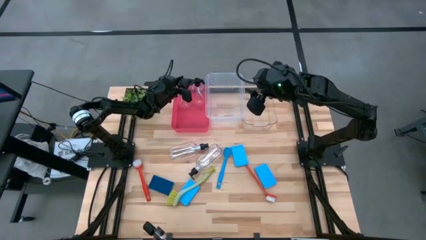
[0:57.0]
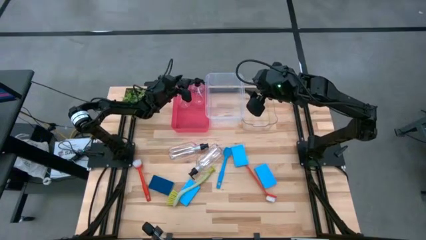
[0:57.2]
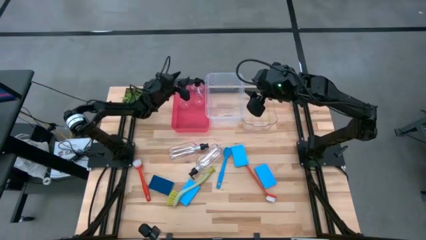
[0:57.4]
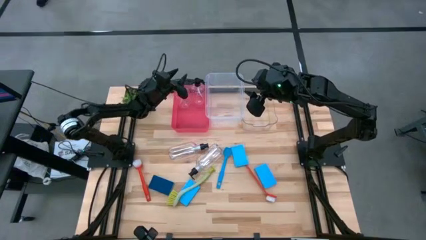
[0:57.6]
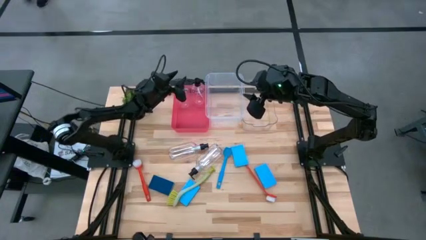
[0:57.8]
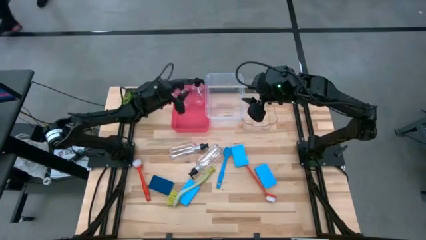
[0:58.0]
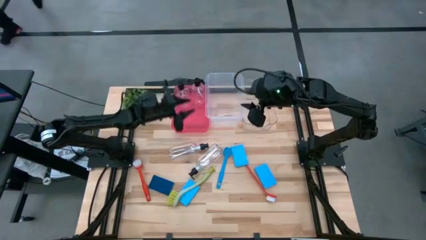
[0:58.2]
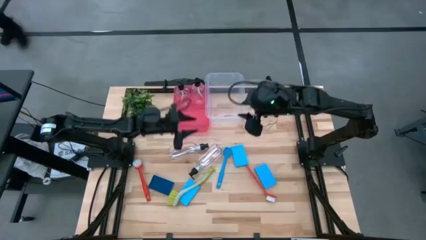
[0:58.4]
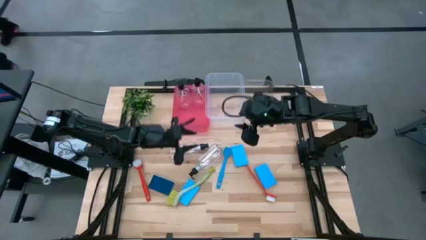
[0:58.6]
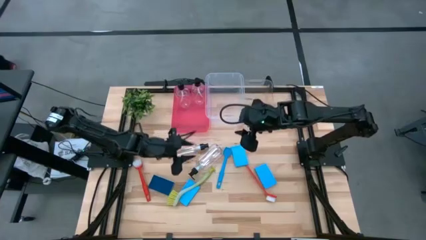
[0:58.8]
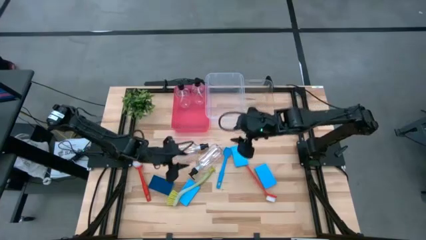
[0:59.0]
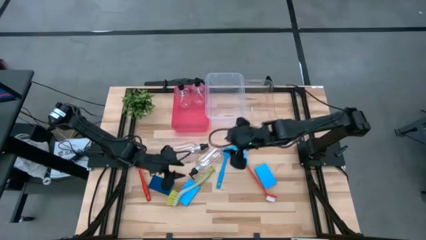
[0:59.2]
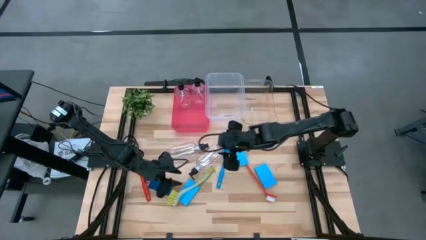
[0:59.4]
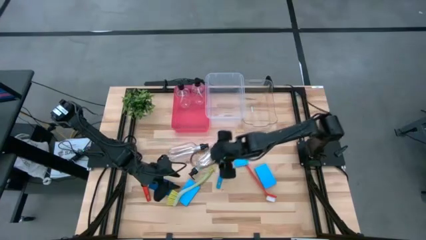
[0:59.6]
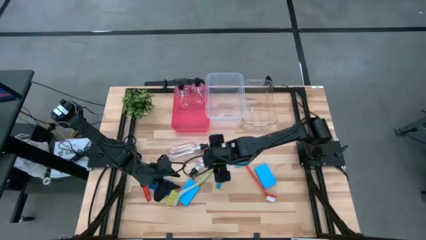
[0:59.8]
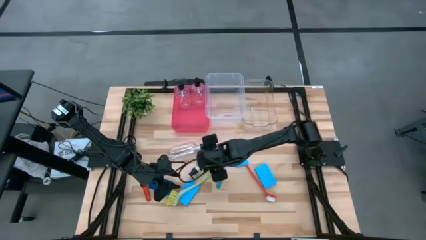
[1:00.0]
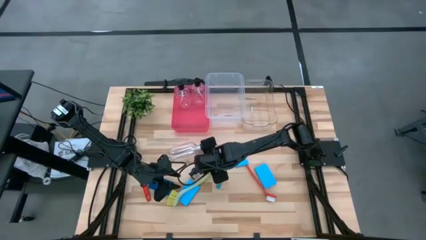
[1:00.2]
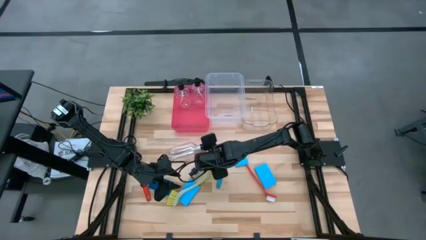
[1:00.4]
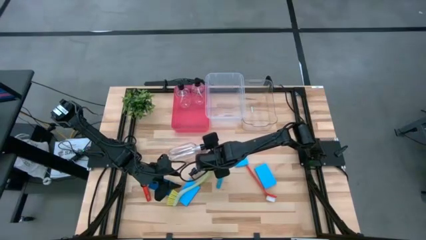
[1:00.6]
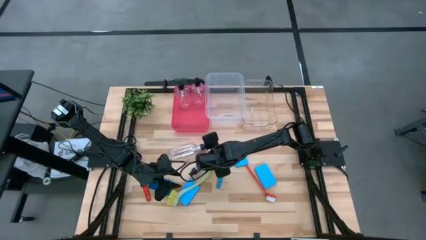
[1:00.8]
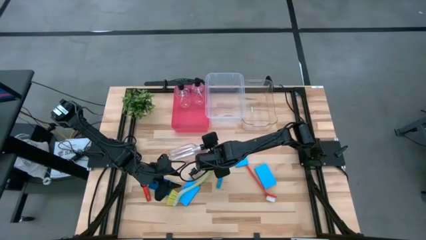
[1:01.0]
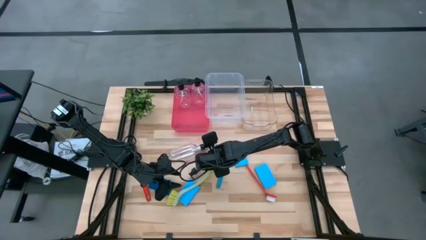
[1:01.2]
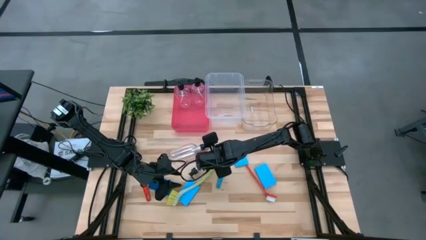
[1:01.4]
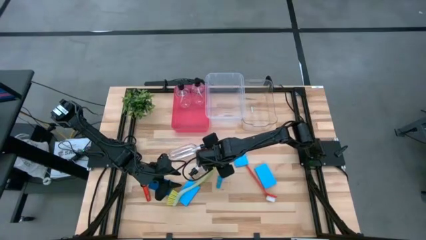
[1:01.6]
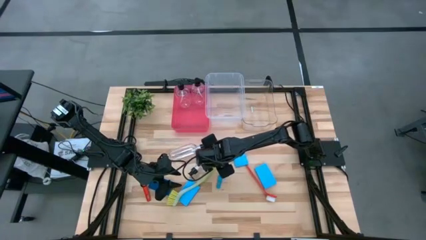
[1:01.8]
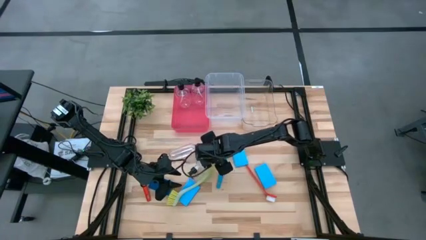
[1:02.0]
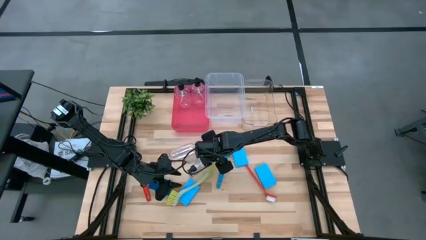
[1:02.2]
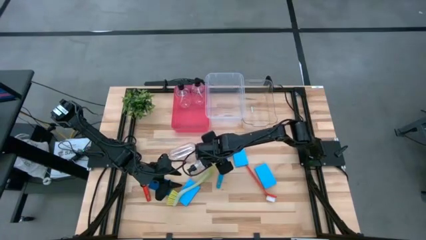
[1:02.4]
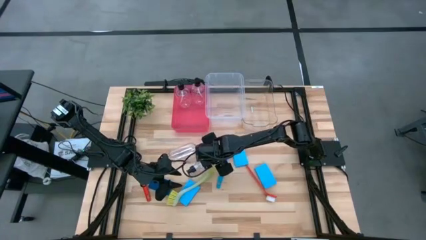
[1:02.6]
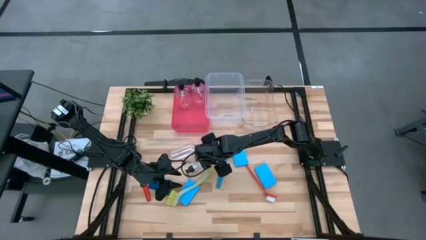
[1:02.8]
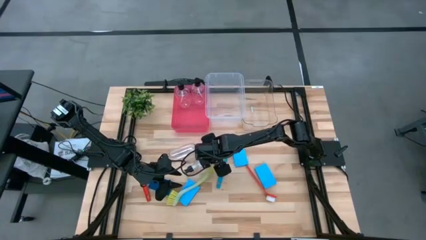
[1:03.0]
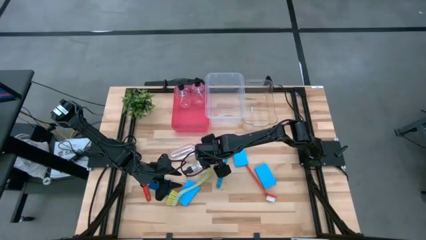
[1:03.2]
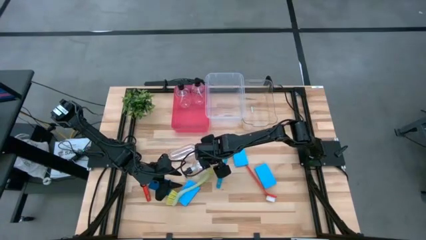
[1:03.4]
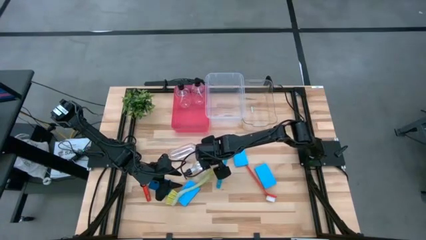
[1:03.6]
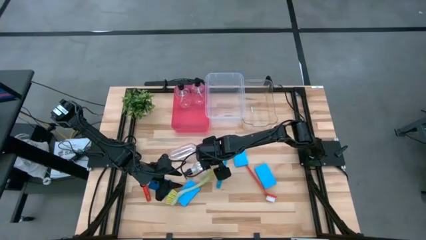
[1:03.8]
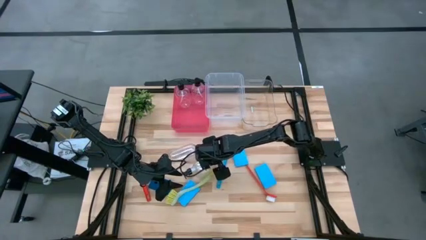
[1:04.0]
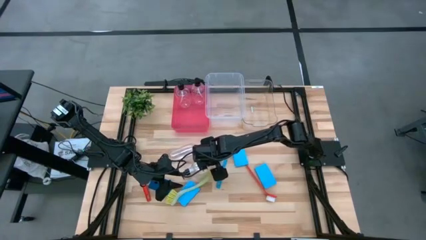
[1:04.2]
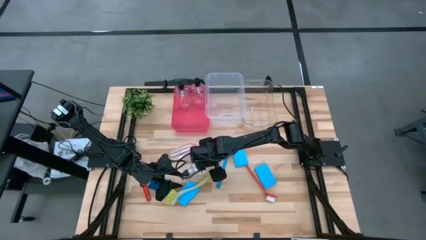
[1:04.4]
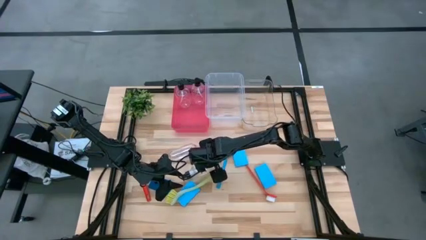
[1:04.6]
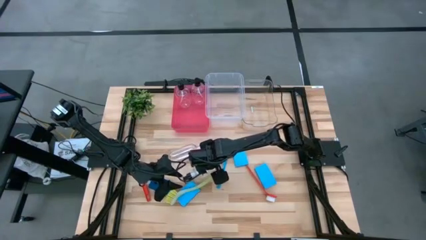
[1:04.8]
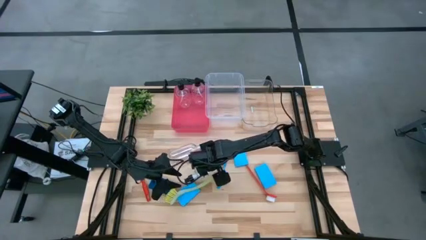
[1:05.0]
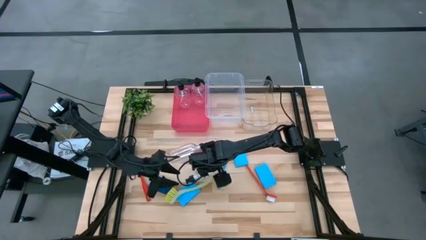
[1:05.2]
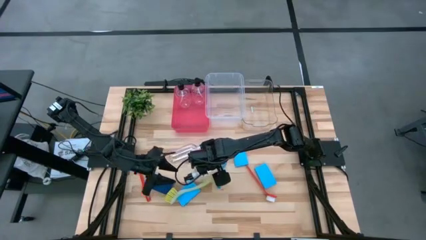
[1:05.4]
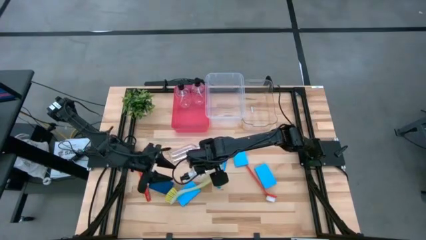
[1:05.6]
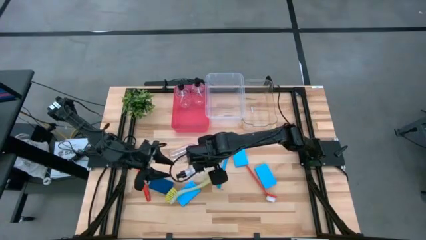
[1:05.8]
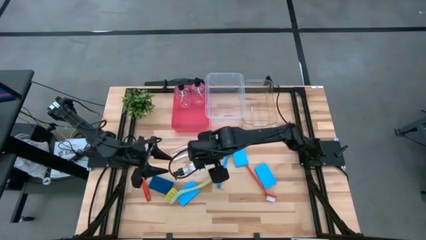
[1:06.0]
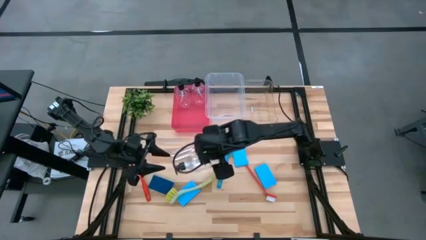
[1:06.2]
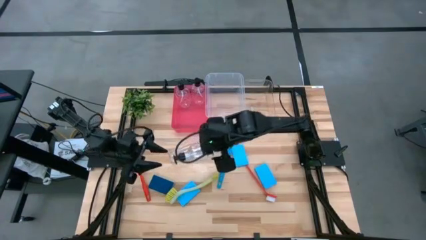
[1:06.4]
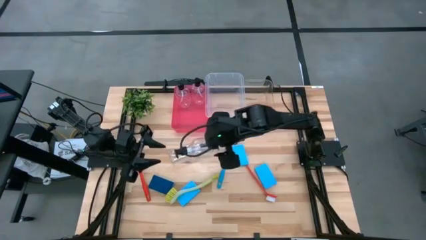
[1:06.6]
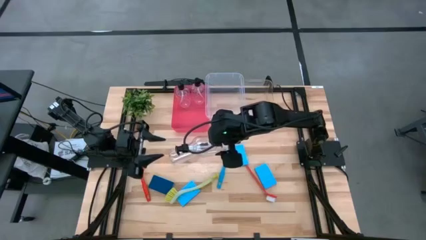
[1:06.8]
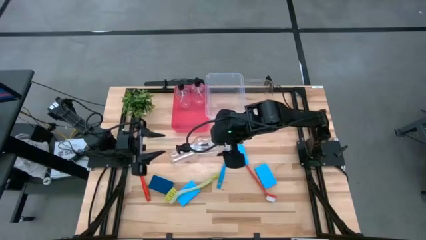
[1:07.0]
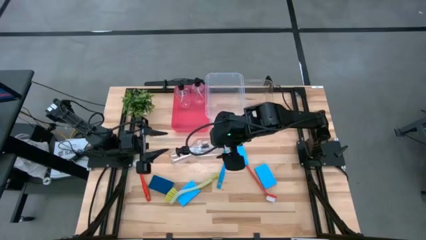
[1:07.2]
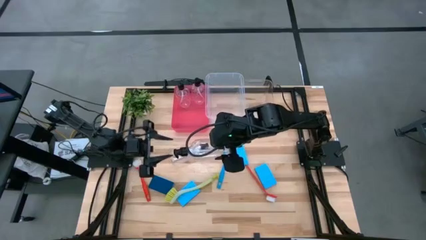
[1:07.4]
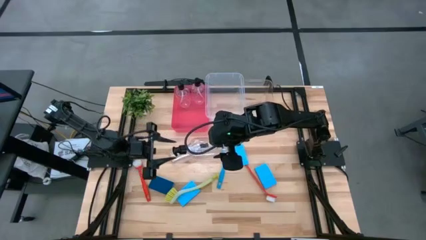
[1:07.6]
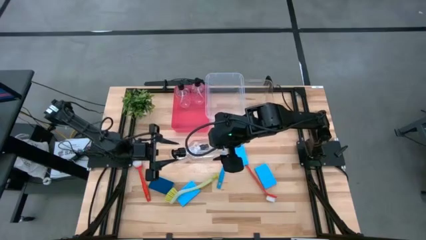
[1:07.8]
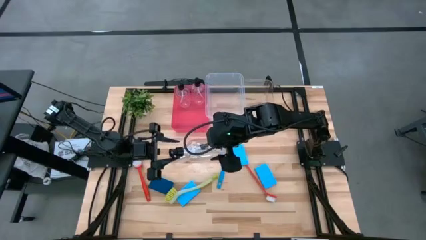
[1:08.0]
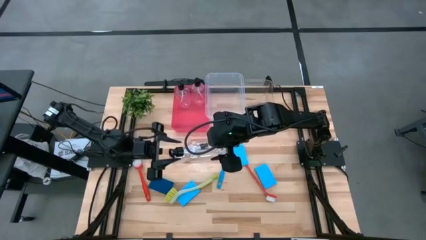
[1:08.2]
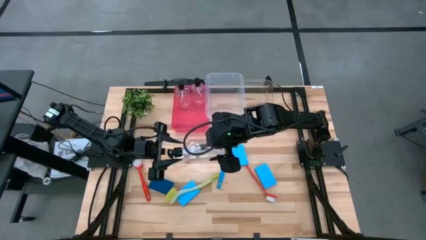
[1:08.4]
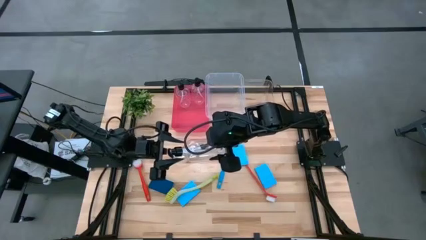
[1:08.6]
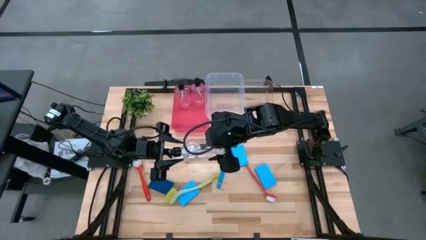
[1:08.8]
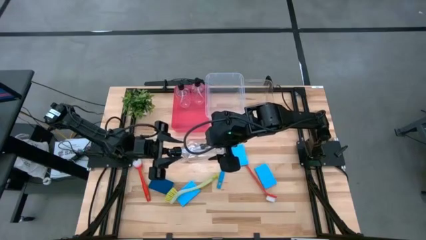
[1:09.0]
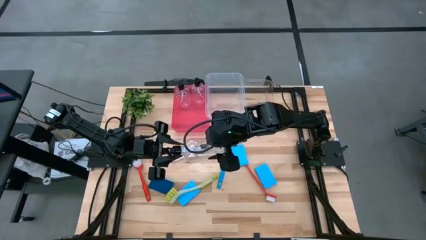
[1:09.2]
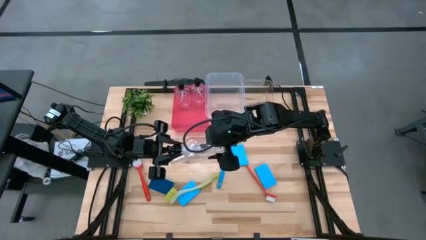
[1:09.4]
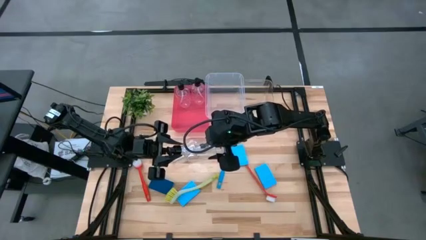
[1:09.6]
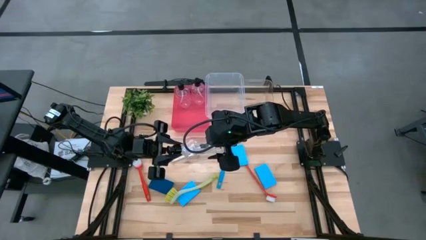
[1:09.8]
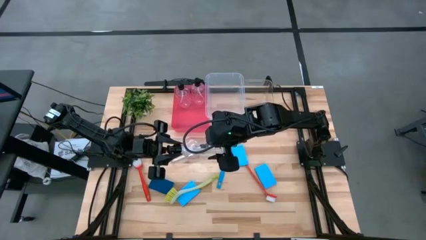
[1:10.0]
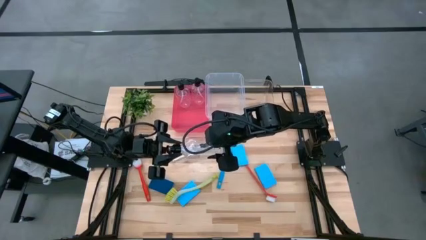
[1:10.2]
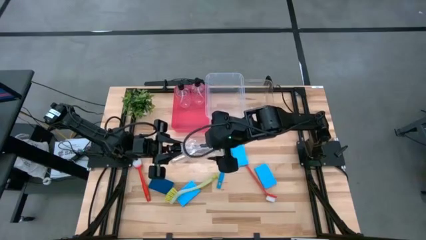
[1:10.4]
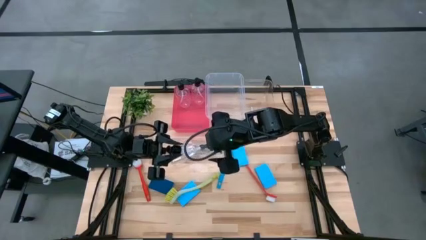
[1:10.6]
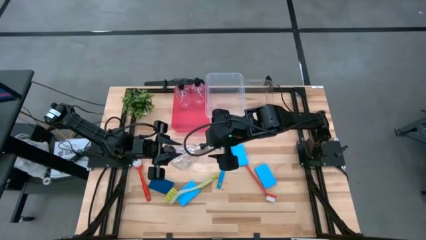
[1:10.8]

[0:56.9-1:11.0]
Task: Pick & Place Kitchen Sink Supplies
Put the bottom left transparent dishwashing liquid dispenser into the red bin

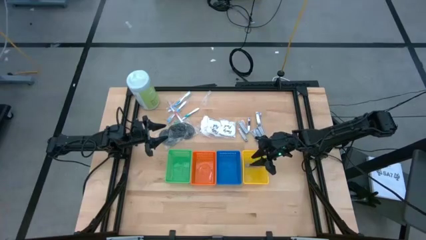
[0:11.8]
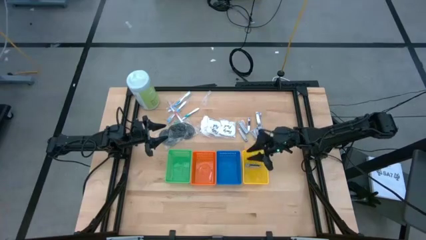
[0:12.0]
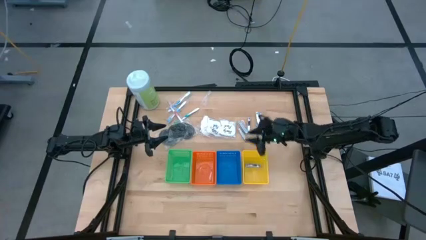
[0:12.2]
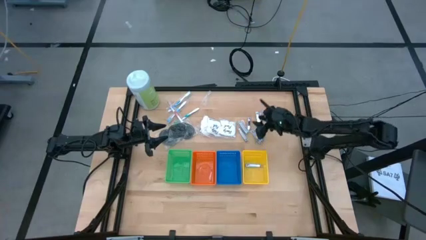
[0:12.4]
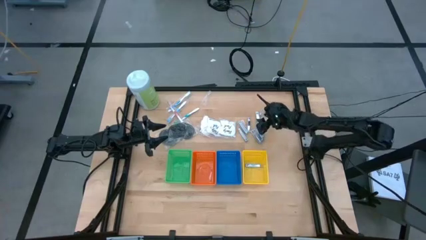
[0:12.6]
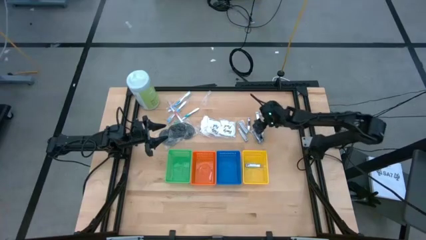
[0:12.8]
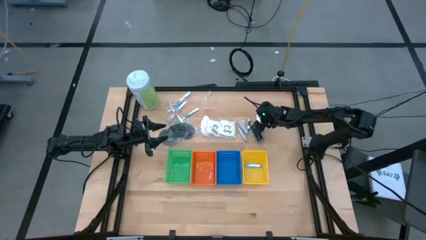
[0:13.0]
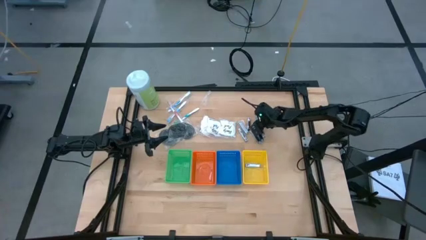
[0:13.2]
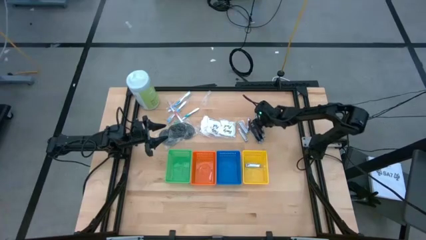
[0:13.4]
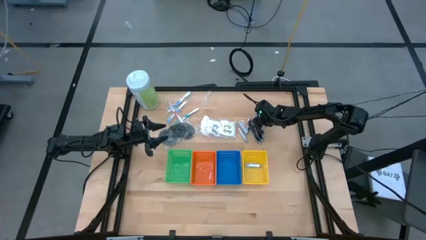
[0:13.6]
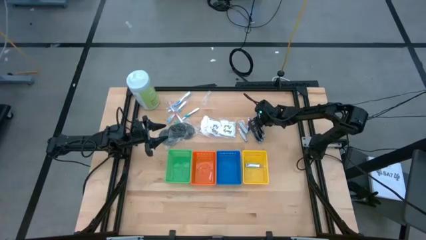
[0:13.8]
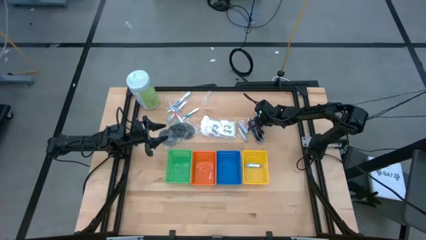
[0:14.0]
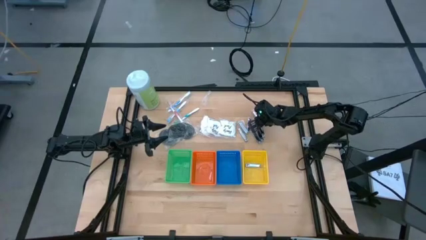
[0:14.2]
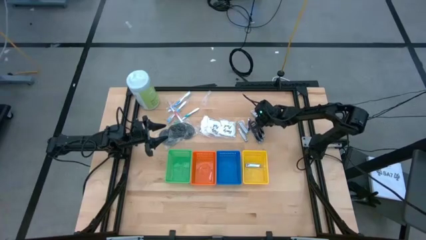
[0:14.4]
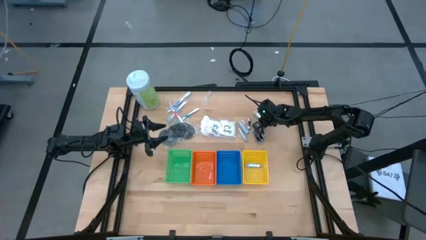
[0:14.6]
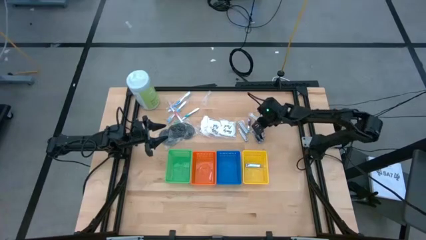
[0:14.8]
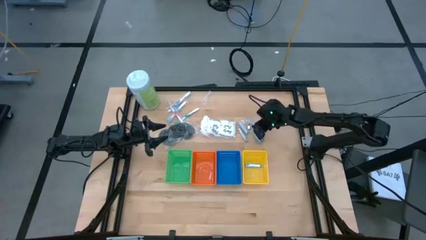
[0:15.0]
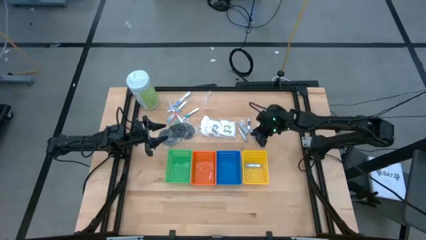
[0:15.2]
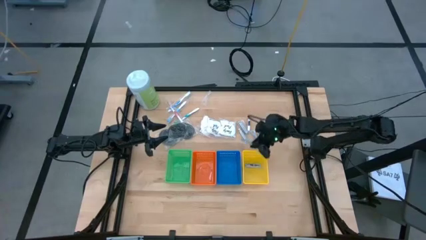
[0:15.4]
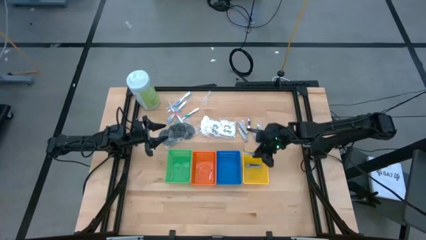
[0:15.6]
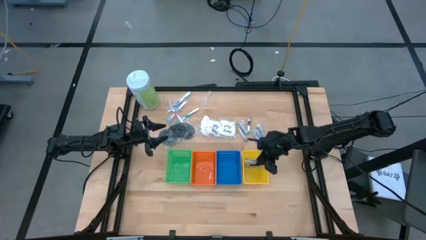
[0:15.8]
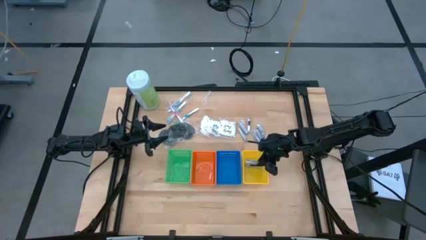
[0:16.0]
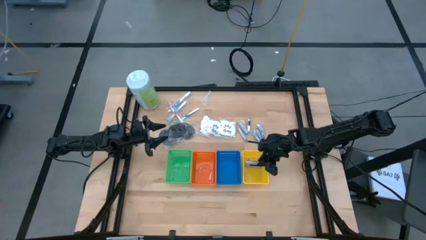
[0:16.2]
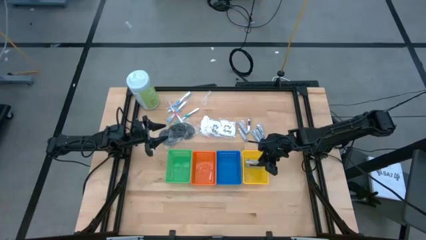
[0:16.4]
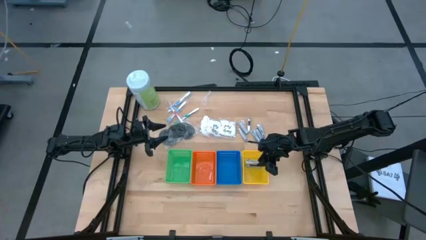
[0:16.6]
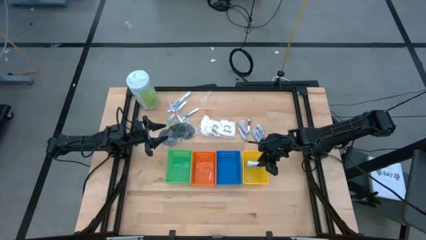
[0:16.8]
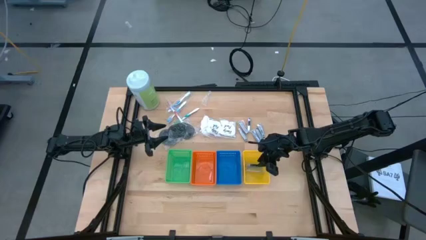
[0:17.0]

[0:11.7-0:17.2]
Task: Pick & Place Travel size toiletries
Put the silver nail cutter into the yellow basket
